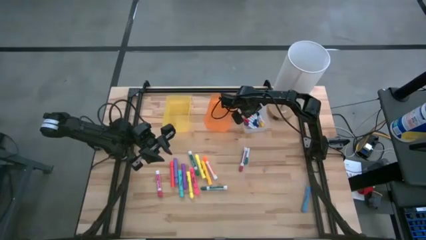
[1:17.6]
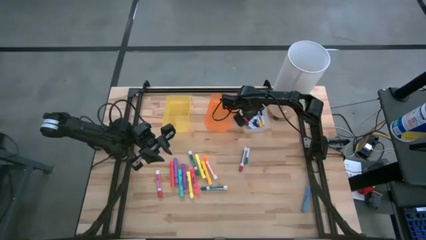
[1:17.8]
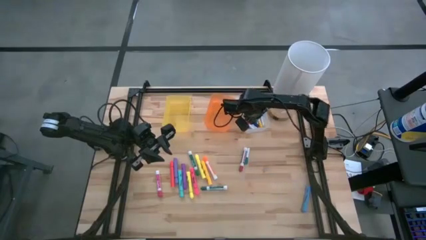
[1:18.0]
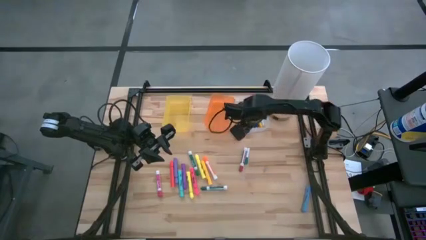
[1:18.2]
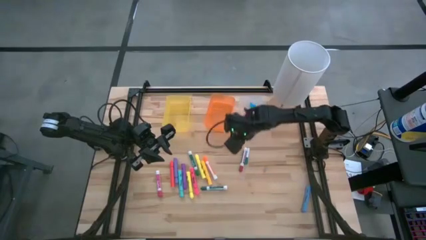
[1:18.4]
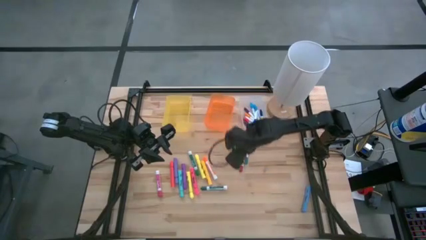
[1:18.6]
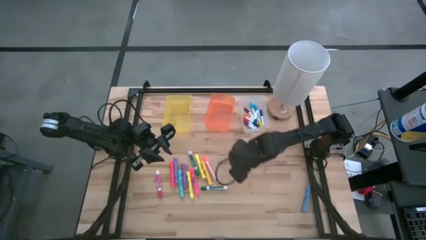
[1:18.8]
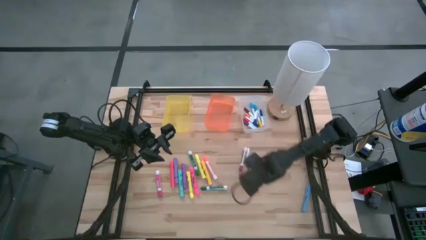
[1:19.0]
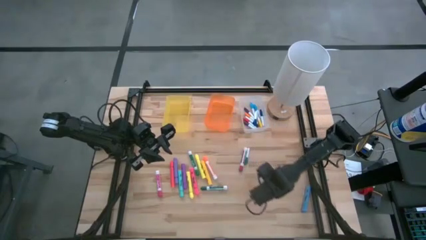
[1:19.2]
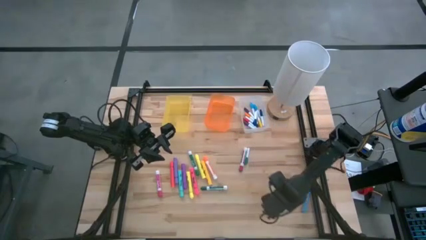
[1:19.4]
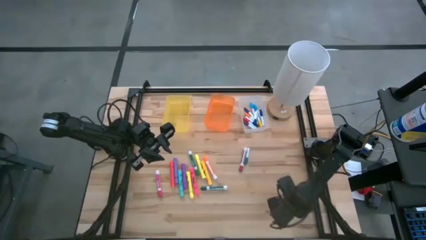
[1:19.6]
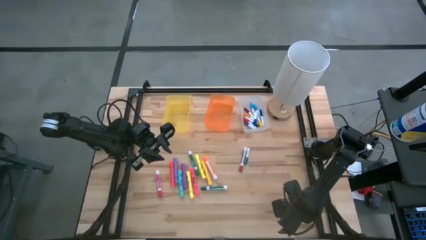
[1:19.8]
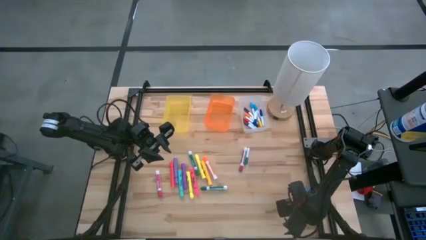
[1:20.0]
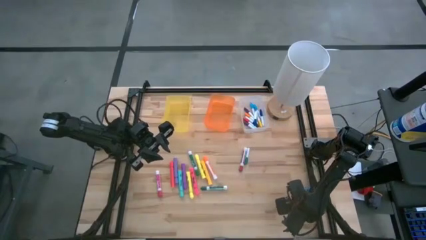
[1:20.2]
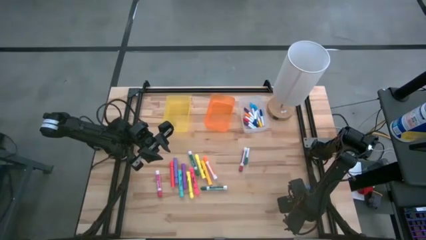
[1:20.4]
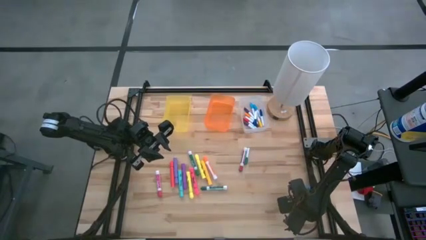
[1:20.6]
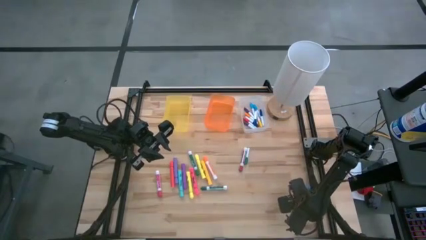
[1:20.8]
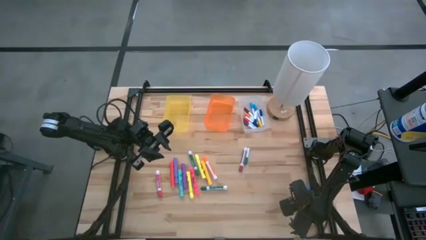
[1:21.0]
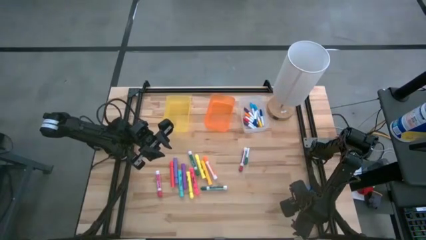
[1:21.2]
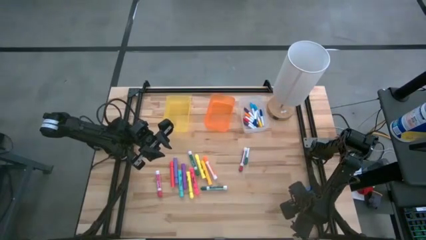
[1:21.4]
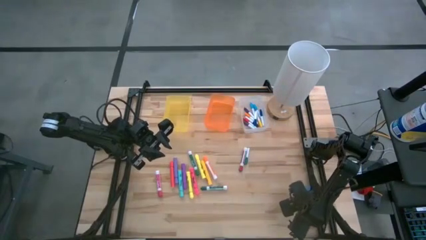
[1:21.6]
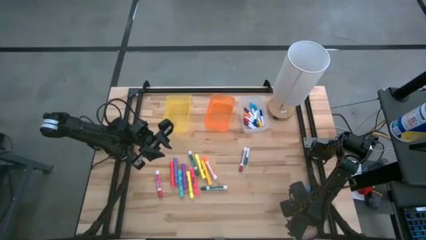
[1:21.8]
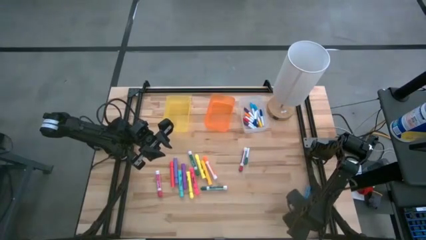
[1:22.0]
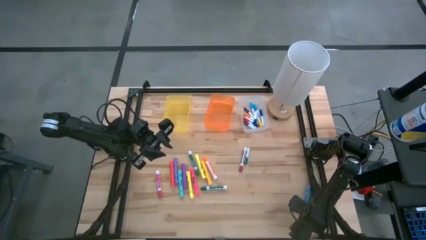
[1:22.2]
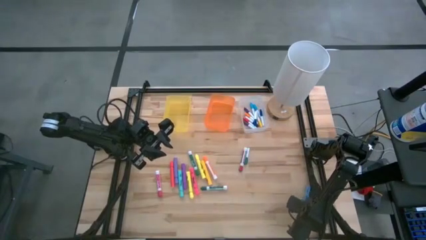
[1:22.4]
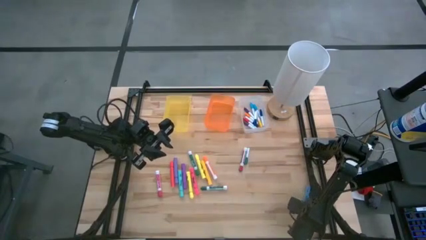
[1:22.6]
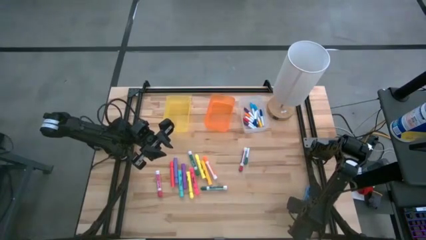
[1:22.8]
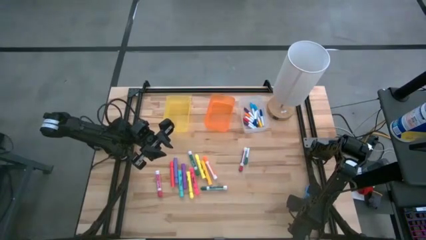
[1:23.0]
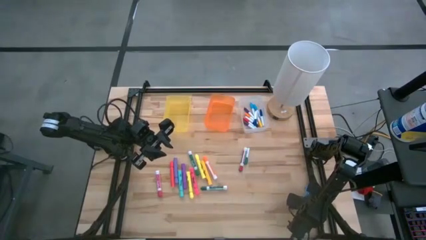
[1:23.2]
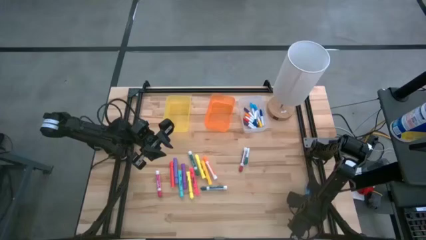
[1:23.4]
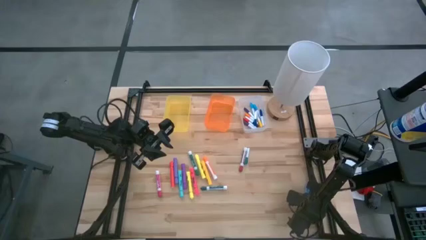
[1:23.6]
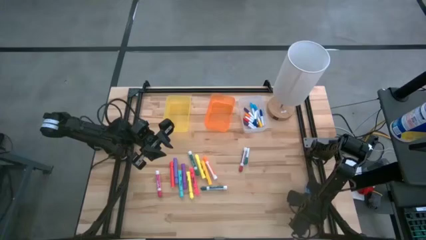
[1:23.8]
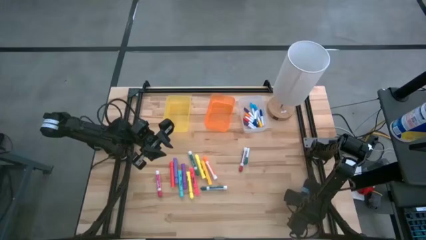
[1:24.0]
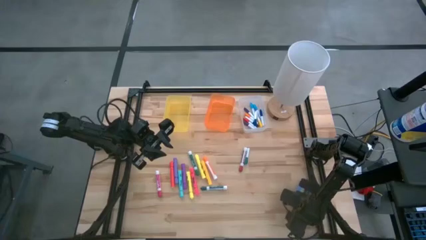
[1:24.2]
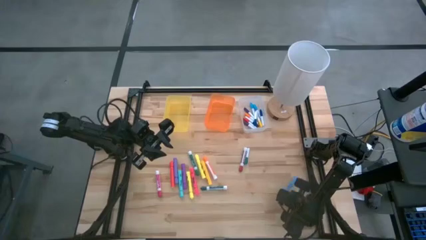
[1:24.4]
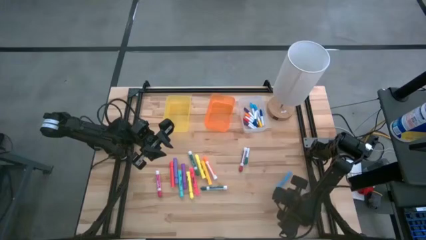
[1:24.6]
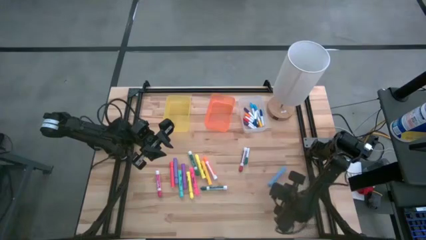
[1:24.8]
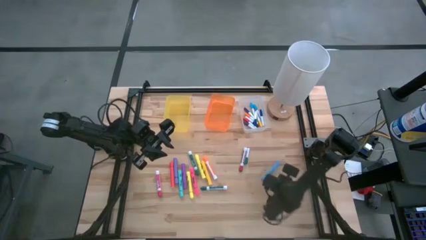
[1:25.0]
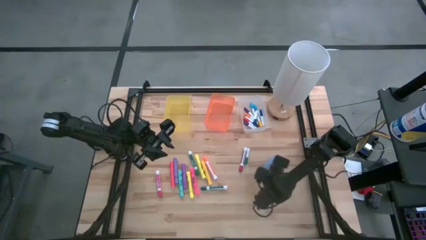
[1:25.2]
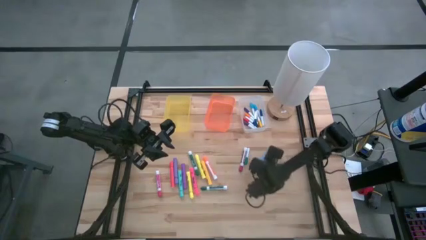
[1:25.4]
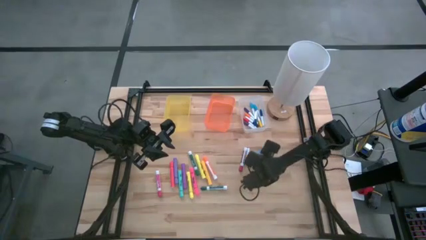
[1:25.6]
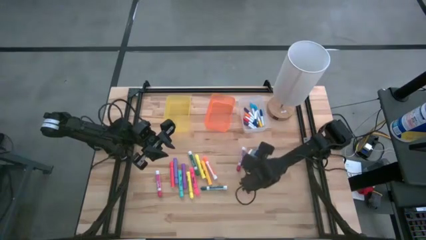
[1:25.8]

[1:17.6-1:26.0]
Task: Pick & Place Markers
Move the blue highlighter to the center of the table

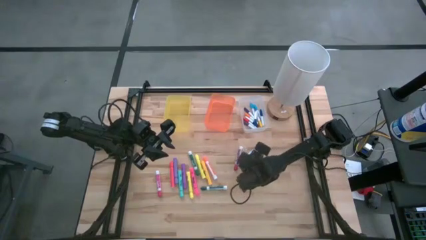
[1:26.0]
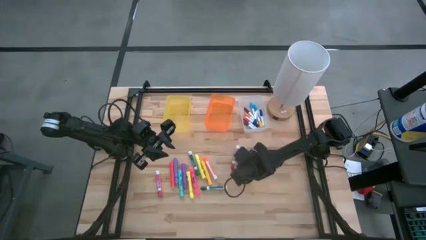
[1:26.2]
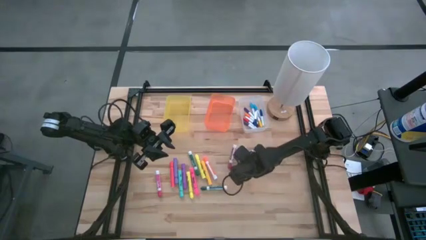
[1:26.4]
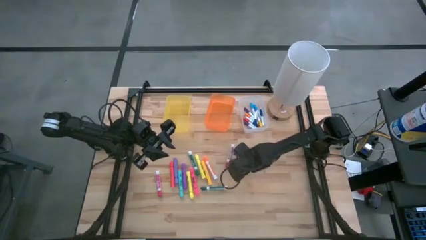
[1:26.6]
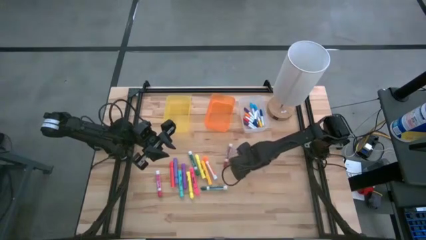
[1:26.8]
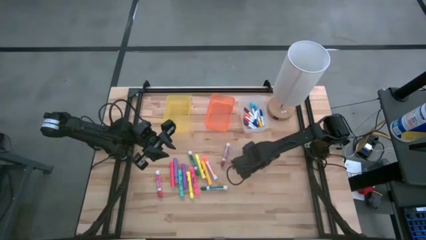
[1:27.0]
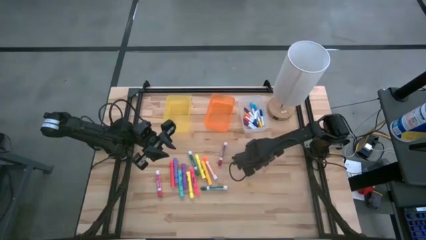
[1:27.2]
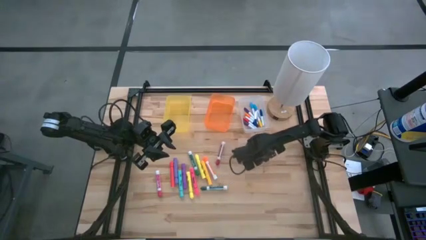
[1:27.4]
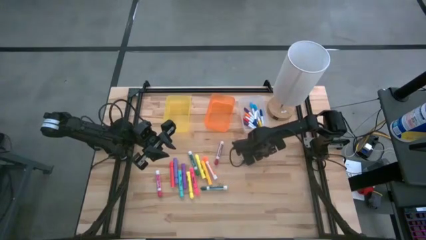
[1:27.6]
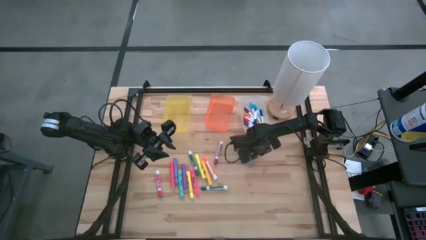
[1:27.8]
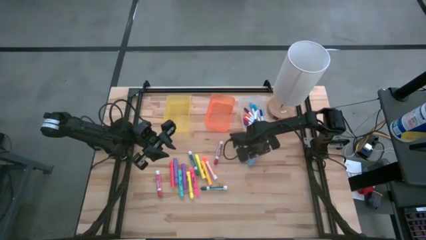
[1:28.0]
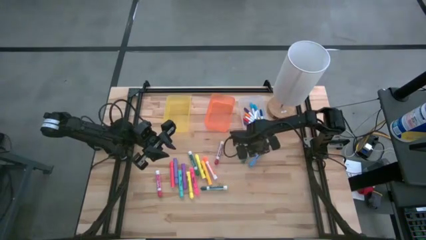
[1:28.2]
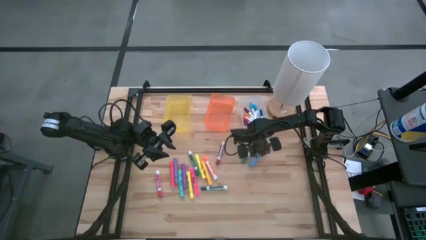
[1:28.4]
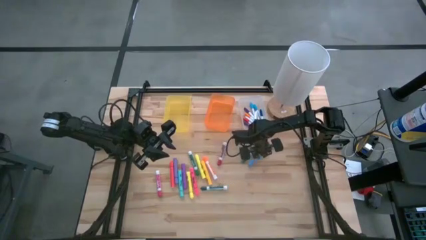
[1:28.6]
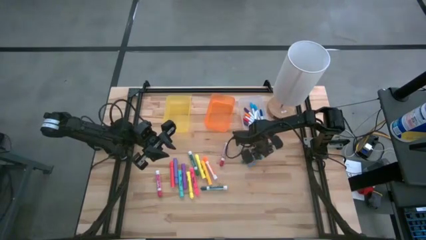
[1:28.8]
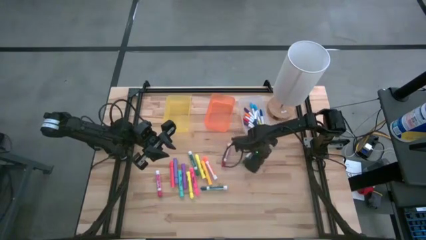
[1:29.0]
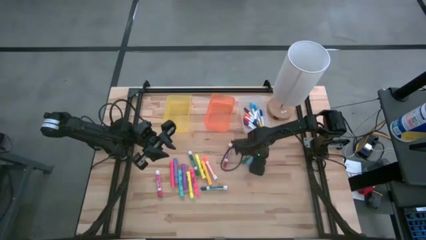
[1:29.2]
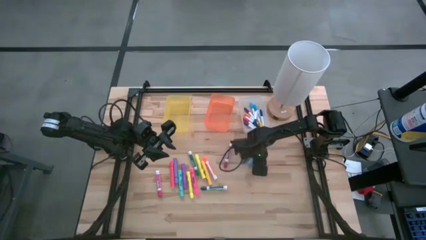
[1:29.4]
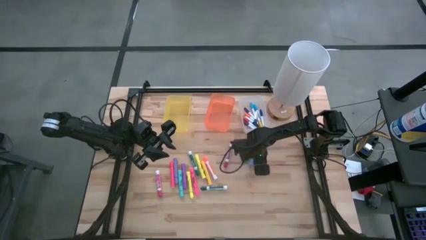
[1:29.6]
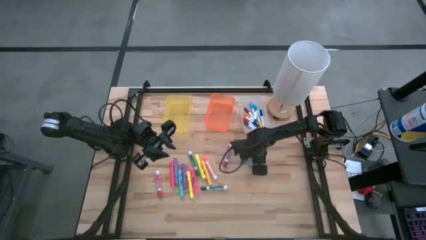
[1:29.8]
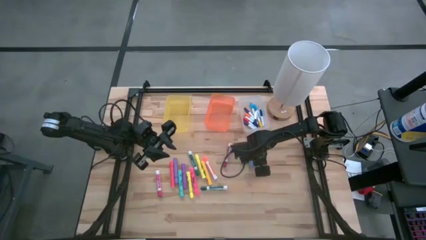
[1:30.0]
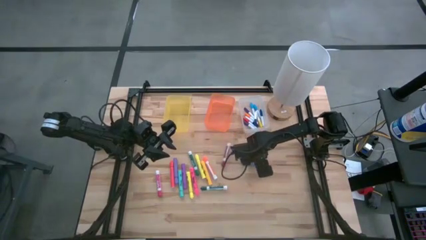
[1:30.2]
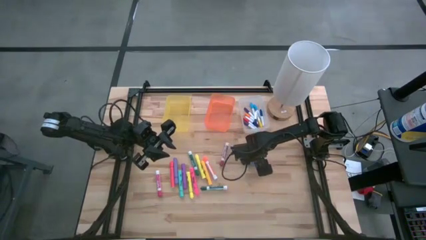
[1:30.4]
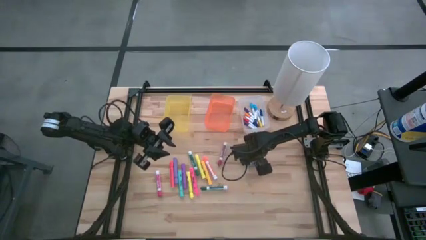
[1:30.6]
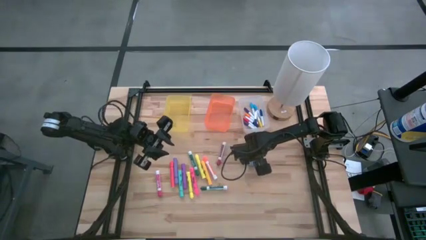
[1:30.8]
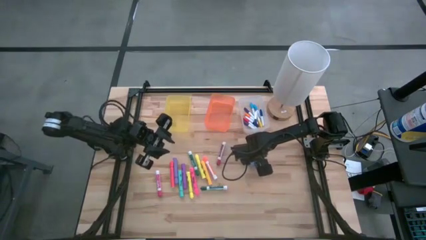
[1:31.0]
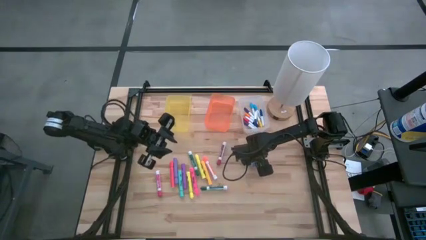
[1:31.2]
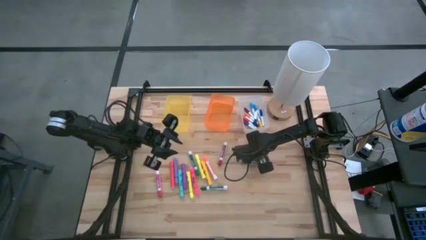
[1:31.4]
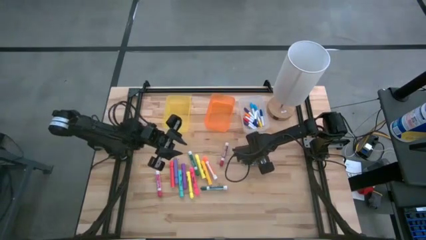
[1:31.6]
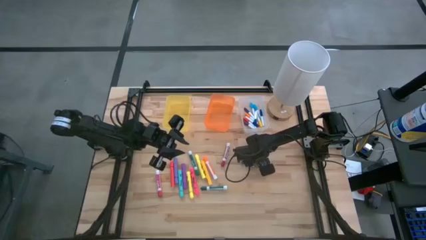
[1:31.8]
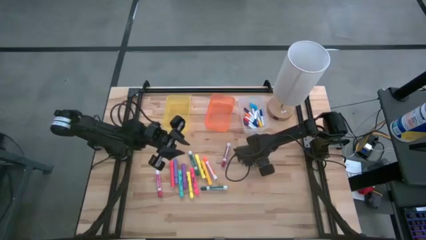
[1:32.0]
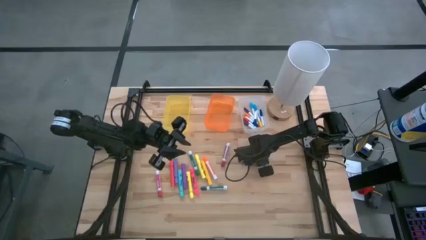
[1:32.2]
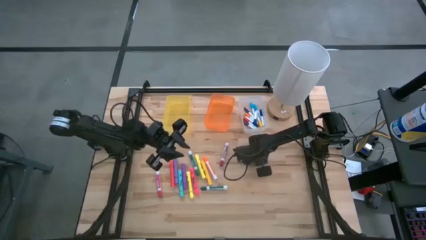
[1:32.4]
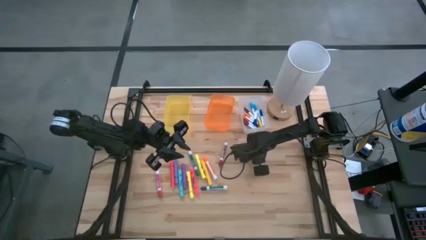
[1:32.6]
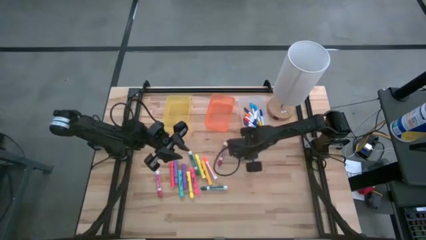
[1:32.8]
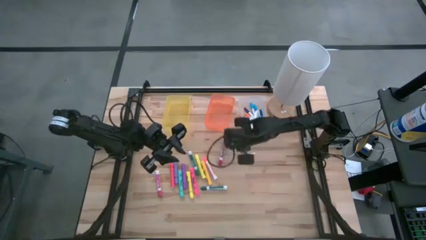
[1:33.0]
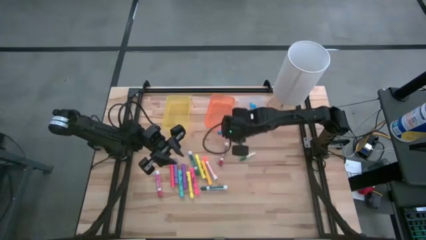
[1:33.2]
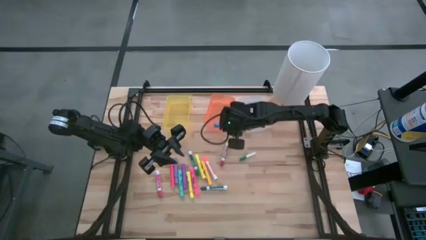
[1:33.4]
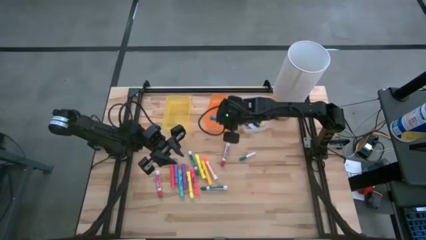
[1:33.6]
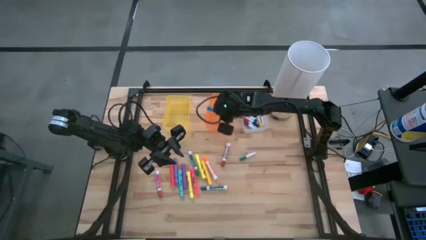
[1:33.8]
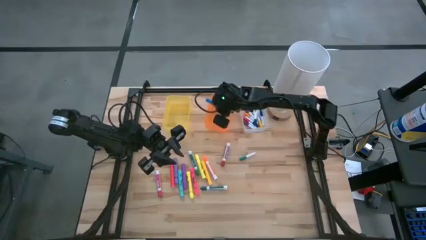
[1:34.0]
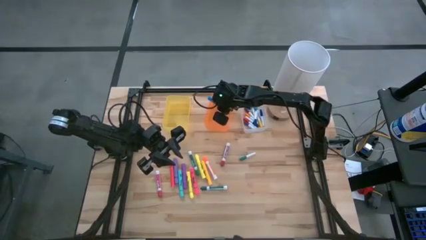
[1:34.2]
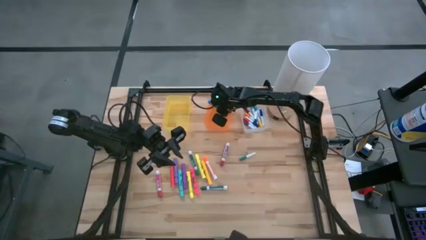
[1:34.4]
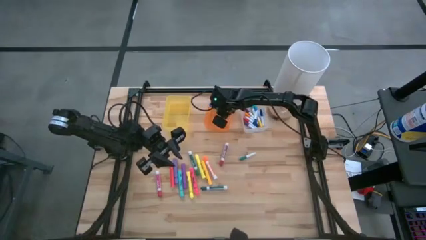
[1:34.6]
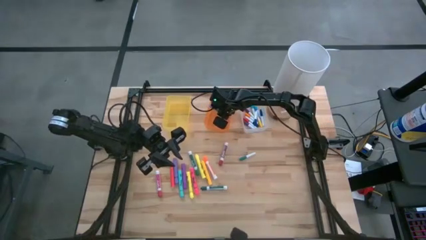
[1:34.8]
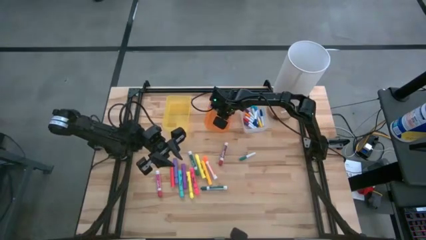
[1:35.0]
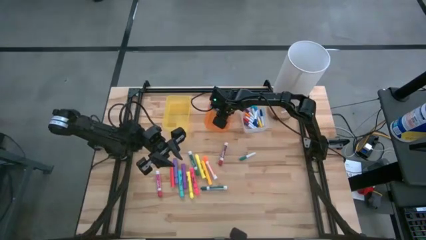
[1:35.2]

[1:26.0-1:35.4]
Put the blue highlighter into the orange bin

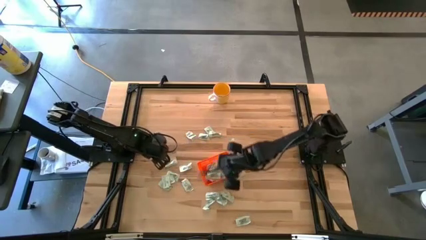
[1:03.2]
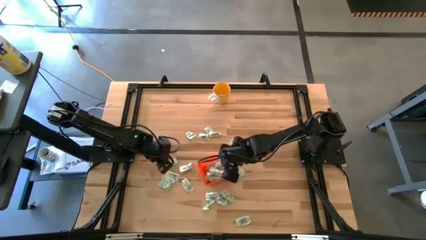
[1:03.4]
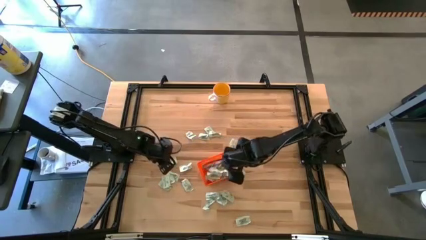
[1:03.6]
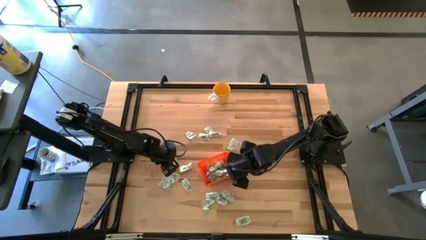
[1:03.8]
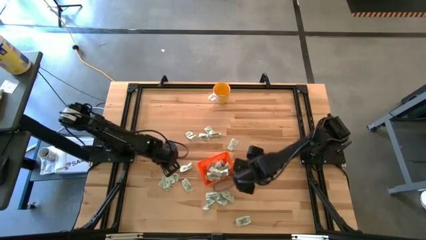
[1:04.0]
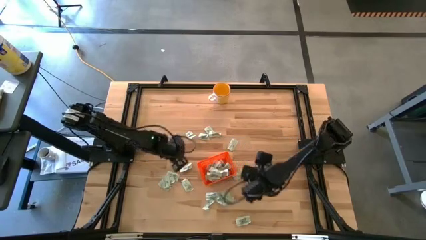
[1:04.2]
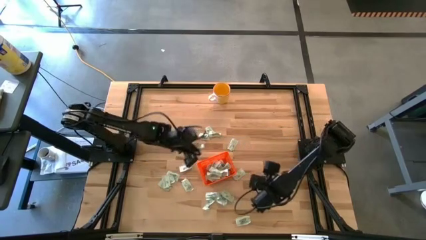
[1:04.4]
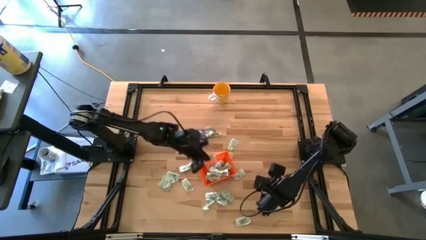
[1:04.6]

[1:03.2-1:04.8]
Task: Pick and place Stevia / Truvia into bins
Put the stevia packet into the bin
